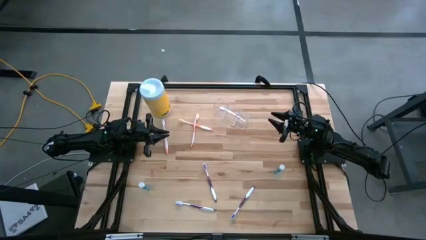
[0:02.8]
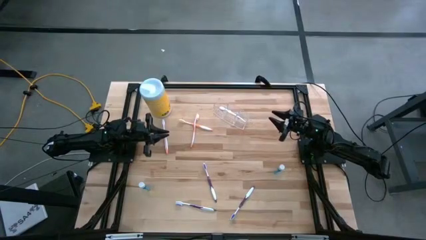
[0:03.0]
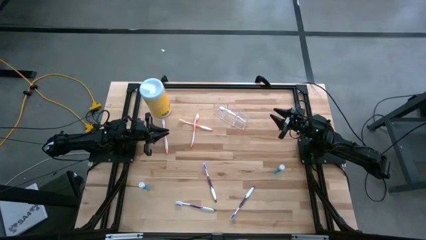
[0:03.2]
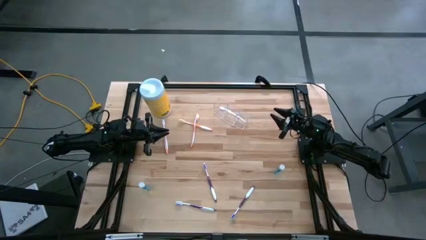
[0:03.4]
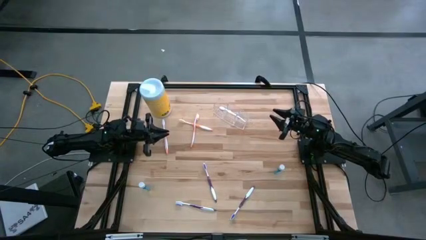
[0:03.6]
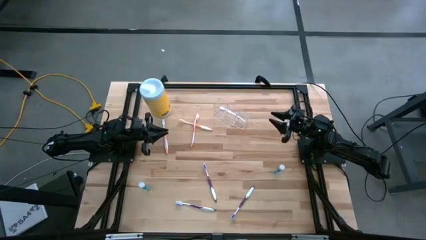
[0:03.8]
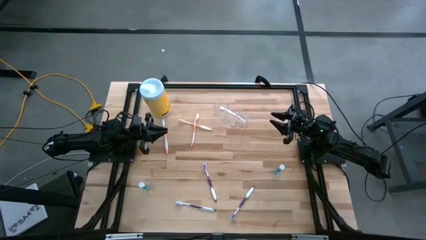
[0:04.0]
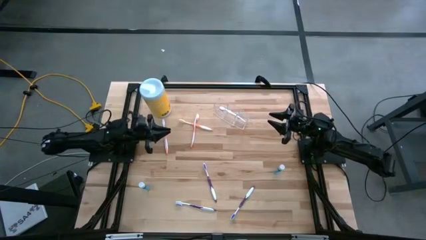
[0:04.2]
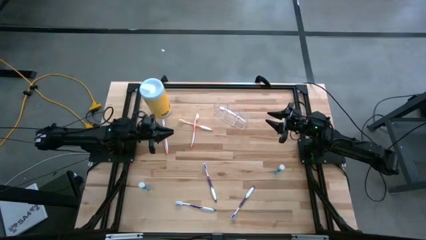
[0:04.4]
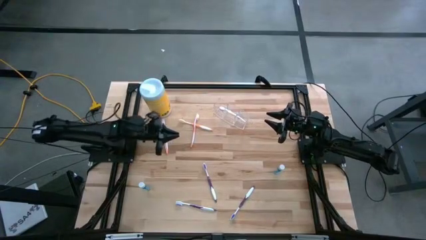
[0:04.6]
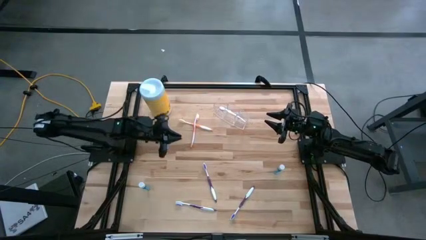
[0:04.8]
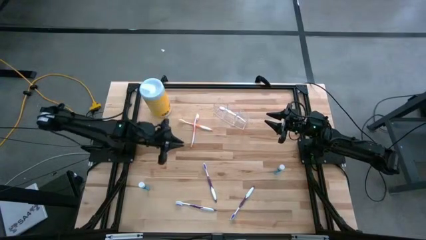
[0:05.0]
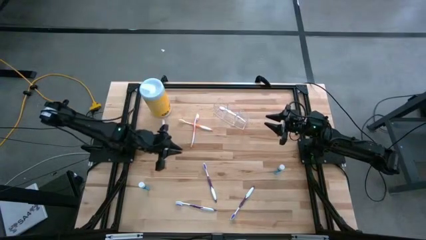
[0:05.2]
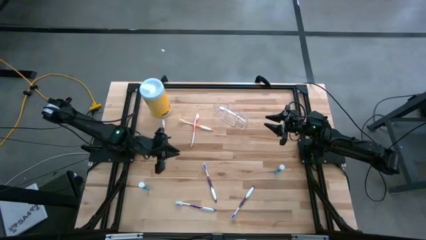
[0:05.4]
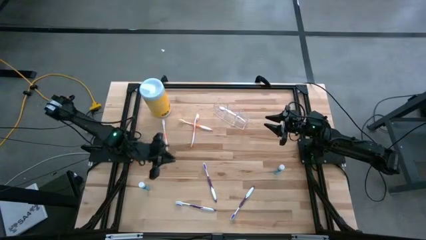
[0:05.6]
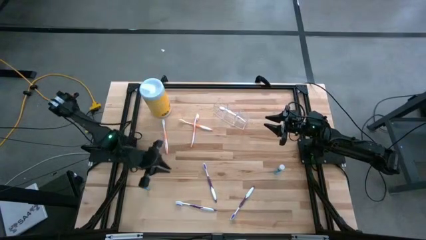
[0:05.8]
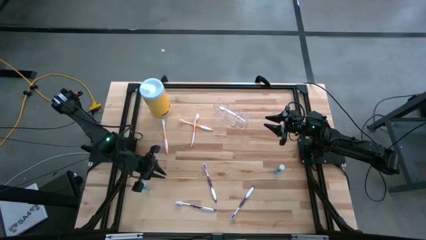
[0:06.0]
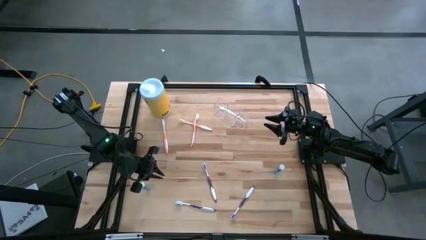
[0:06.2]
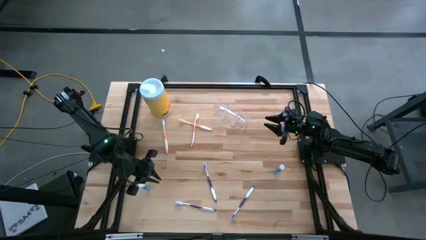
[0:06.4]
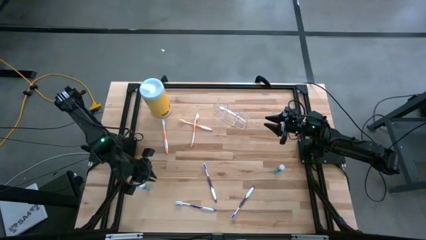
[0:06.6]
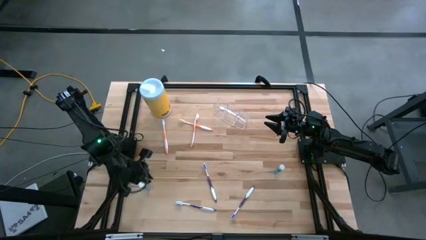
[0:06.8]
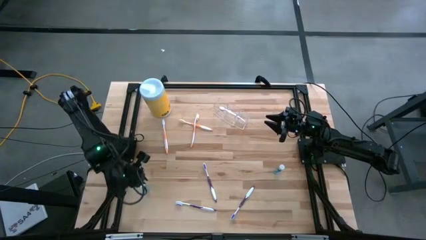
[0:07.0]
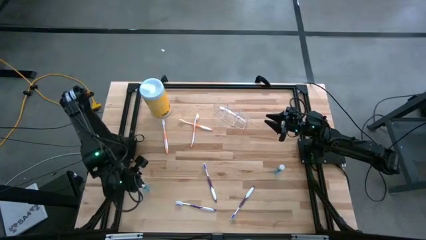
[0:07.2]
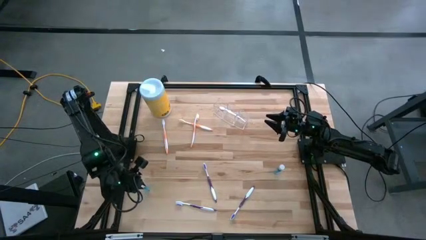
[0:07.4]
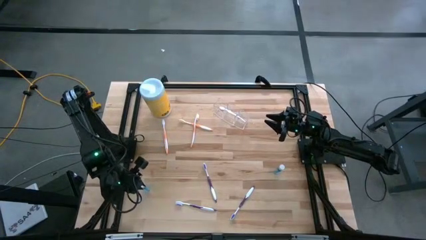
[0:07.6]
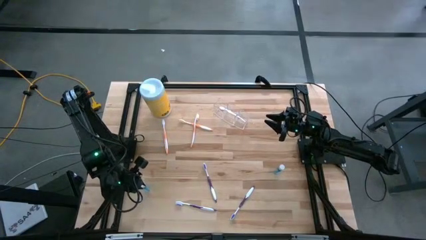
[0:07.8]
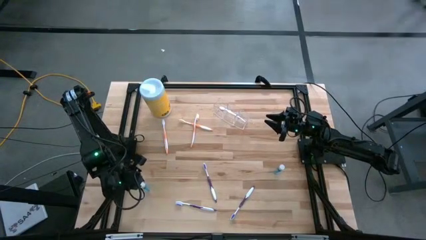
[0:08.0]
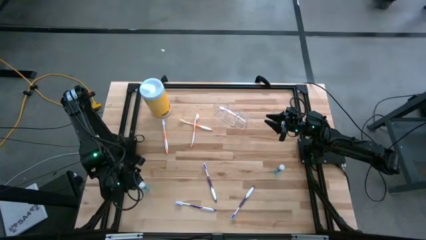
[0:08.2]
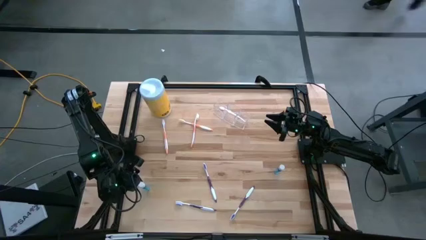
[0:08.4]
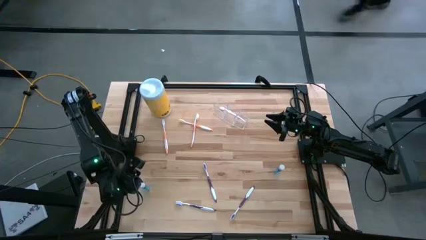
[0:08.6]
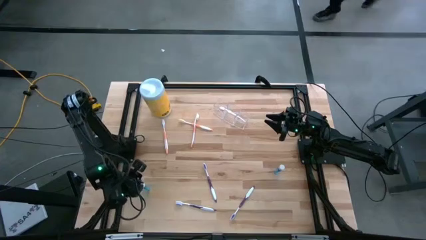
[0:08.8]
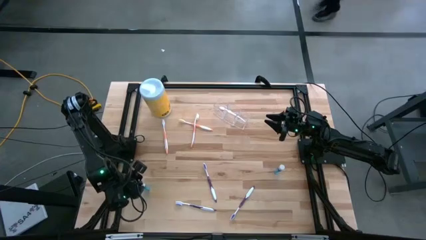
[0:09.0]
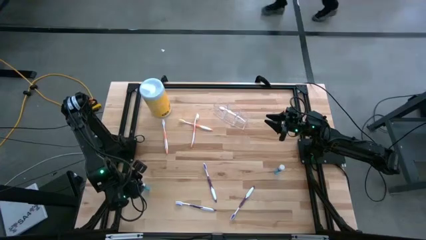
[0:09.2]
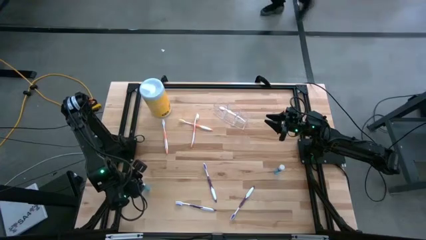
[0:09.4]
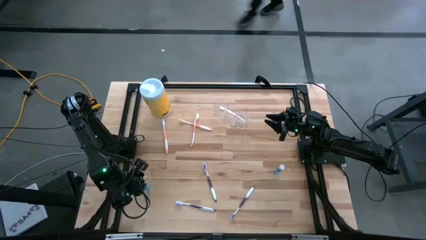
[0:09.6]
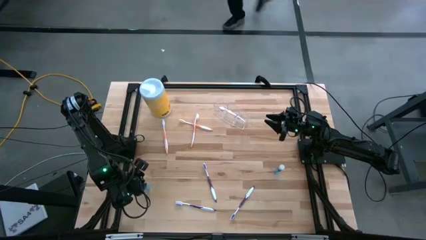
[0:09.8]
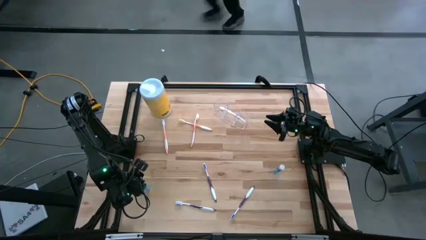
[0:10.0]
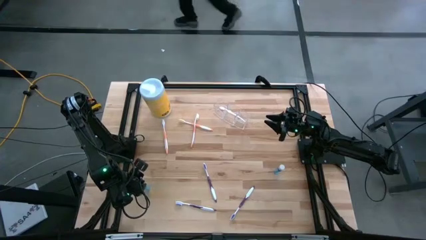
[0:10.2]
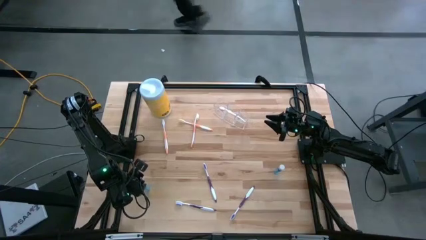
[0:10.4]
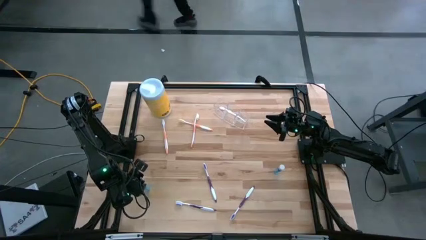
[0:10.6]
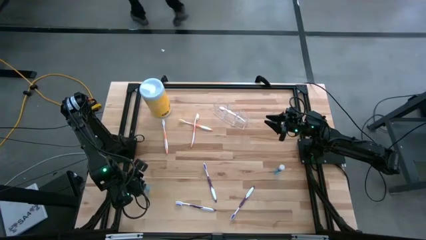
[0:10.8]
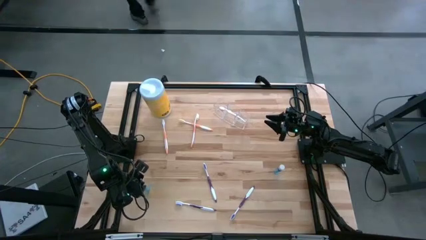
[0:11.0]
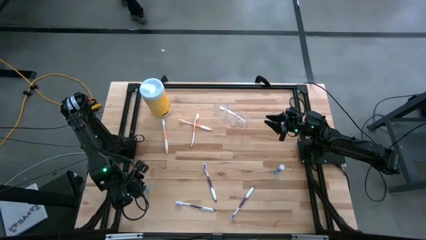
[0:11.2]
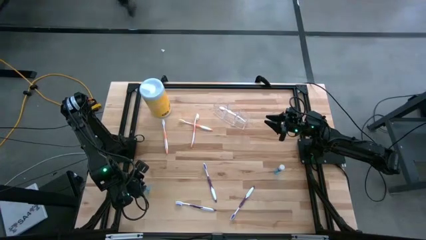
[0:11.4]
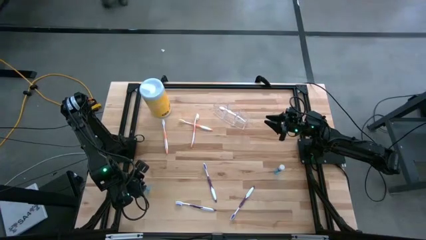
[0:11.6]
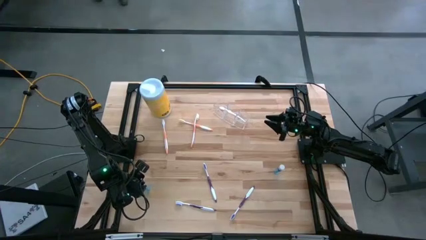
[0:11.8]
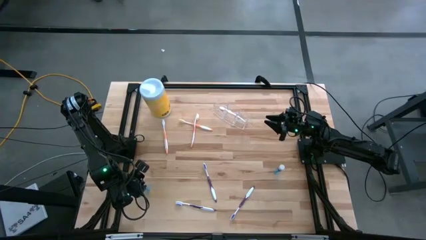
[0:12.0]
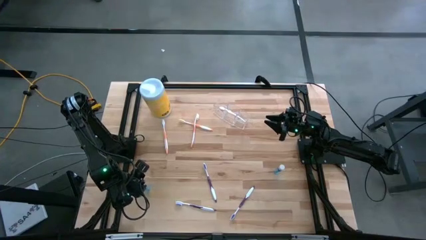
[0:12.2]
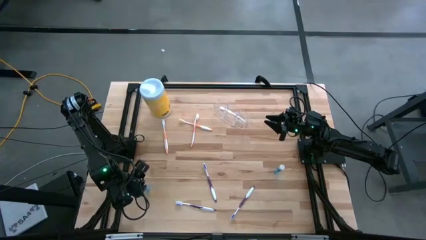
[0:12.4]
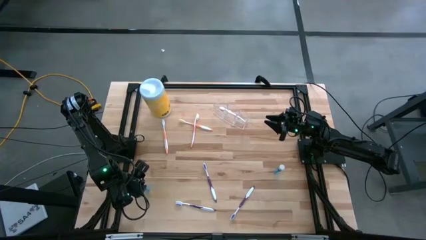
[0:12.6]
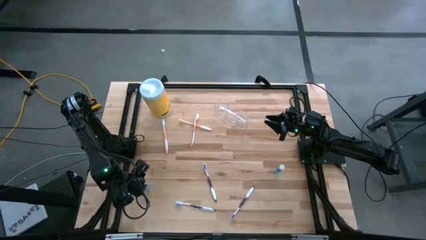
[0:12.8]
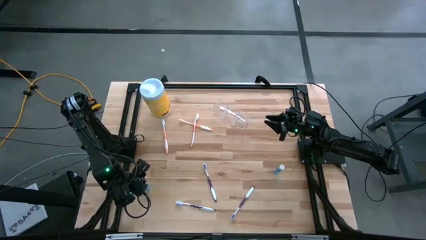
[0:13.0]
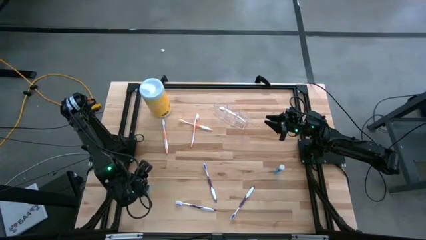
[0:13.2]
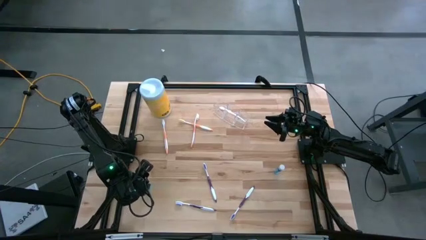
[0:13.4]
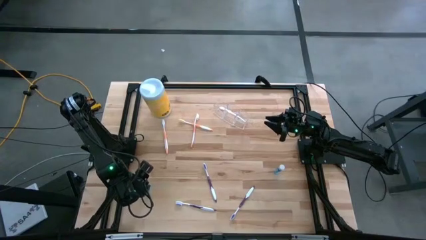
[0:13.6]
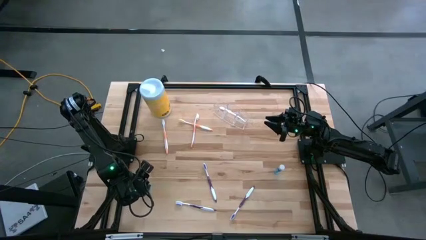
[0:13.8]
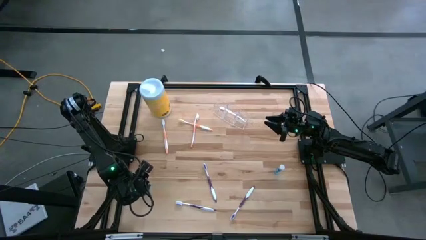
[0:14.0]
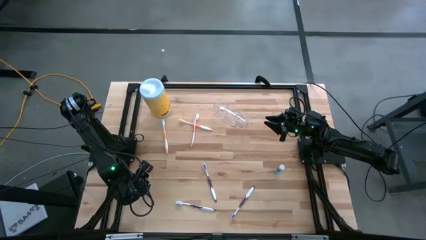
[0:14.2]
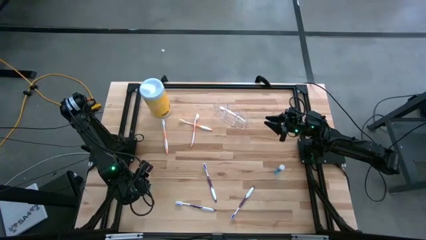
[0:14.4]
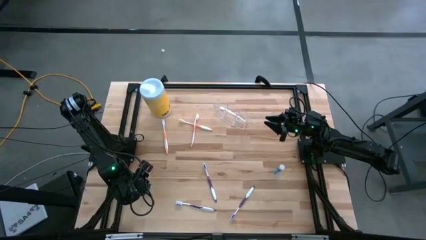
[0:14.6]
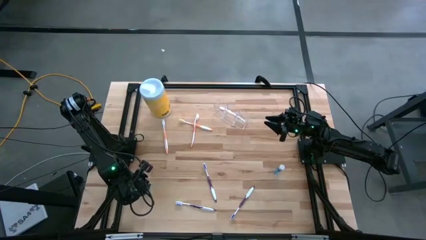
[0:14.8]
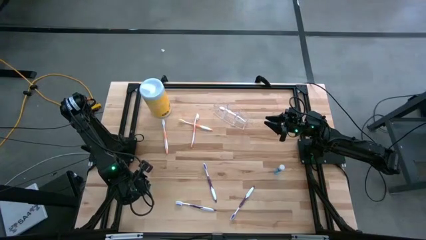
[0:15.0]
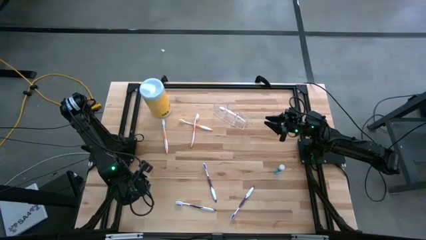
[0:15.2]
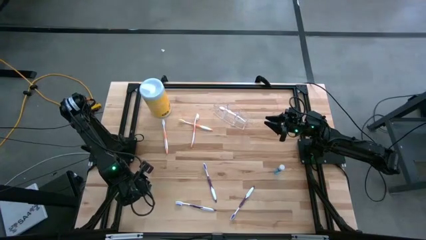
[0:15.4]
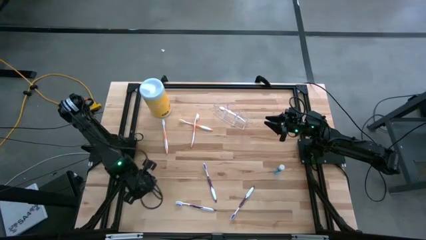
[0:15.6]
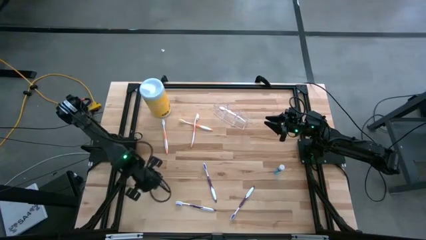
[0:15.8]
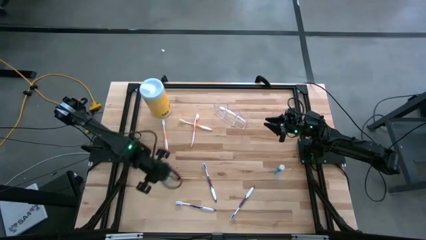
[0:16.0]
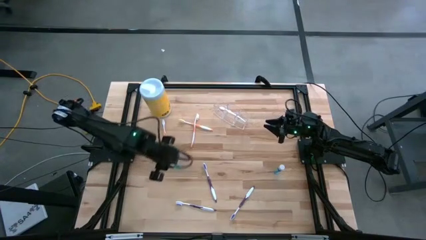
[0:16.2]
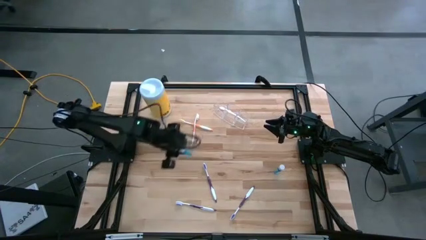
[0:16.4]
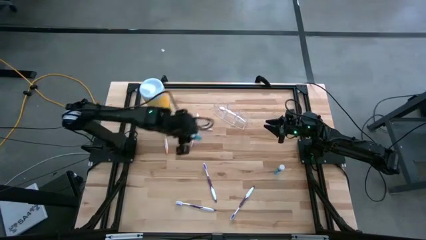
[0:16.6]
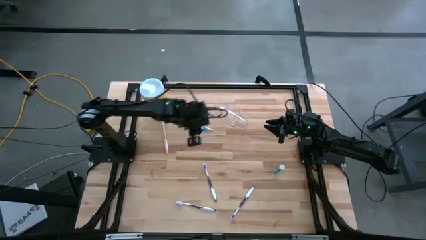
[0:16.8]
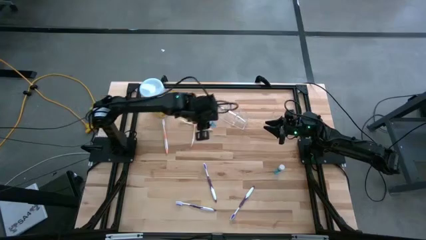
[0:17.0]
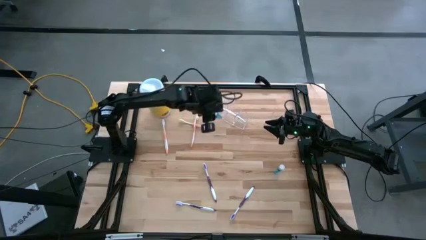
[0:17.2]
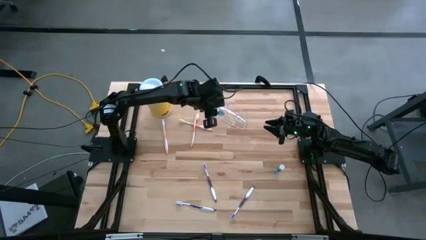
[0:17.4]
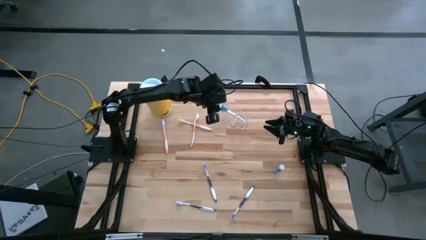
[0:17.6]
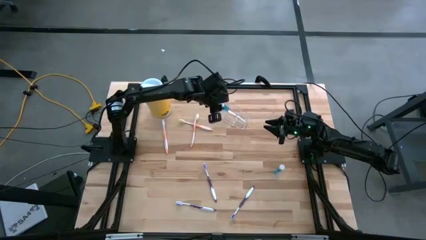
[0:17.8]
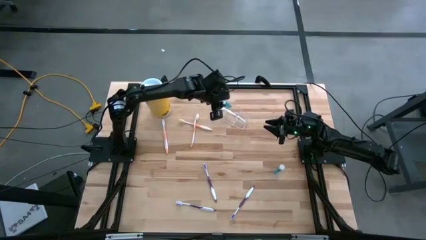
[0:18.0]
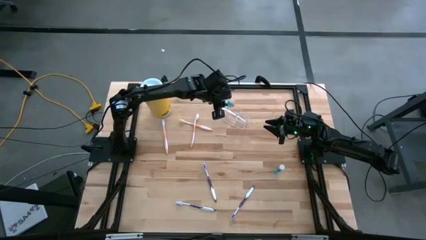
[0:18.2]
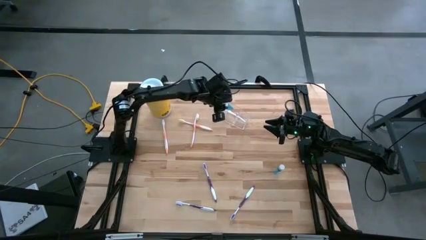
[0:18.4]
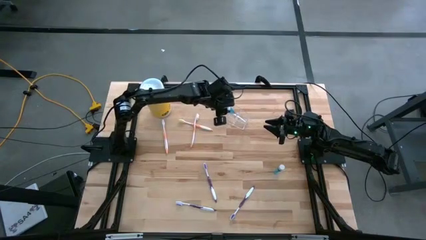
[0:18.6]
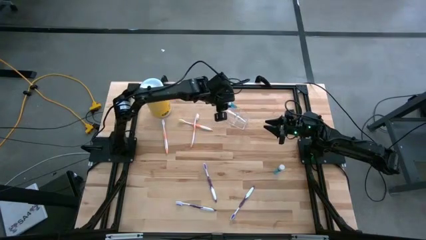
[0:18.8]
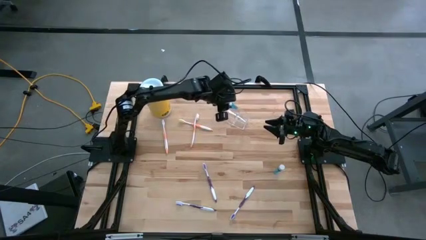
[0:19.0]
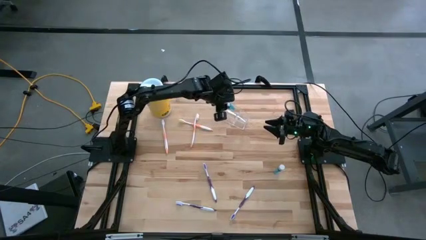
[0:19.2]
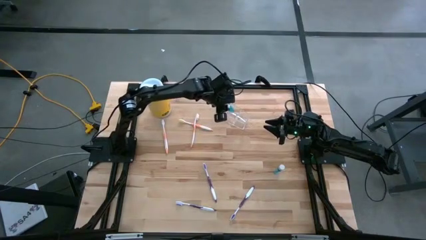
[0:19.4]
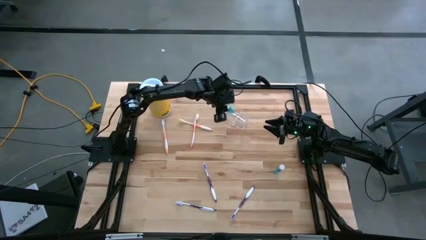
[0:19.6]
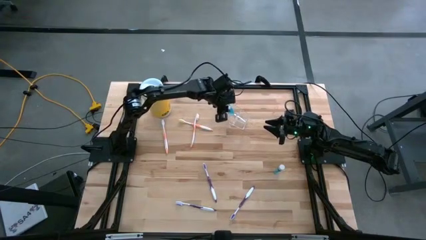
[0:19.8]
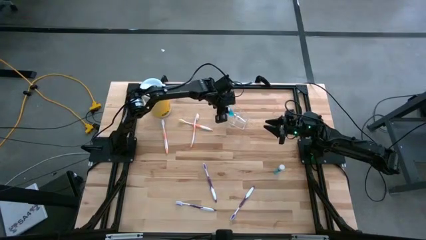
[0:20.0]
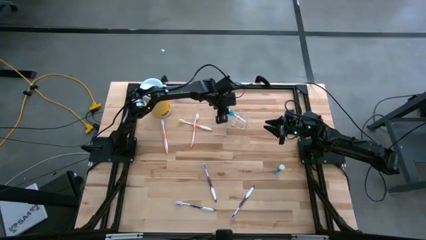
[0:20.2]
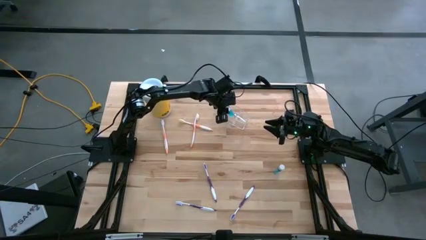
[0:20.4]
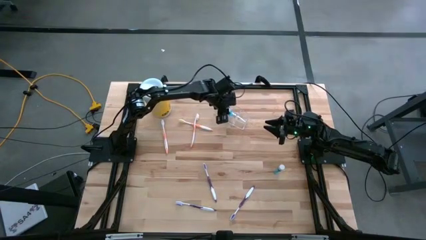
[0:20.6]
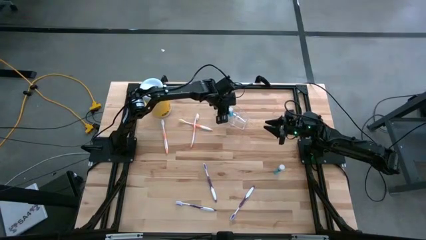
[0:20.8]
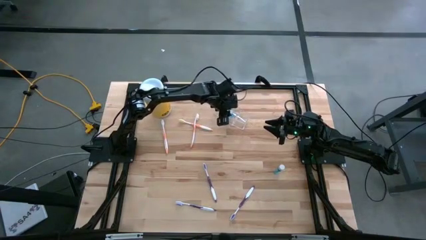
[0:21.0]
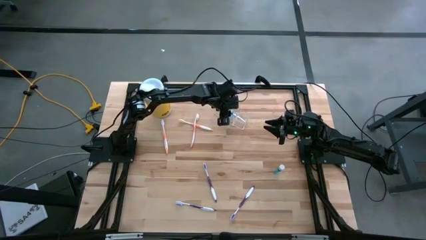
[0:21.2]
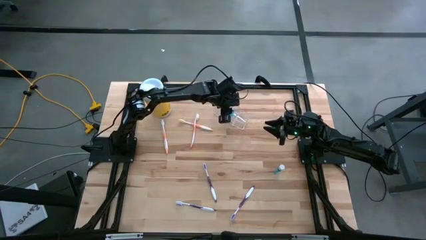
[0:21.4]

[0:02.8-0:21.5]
Task: Pick & Place toothbrushing station
Put the left mouthwash into the transparent organizer
